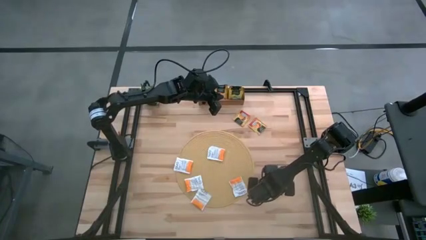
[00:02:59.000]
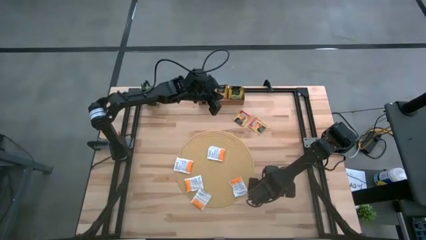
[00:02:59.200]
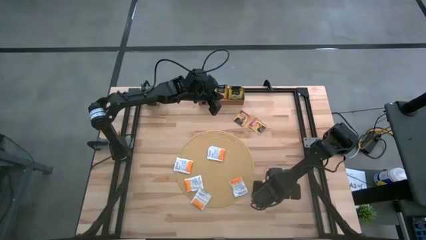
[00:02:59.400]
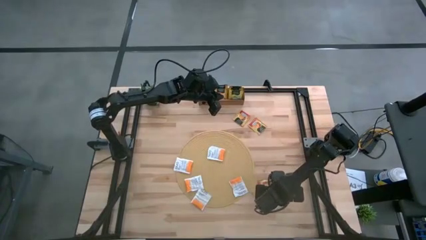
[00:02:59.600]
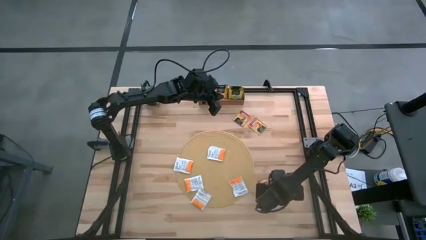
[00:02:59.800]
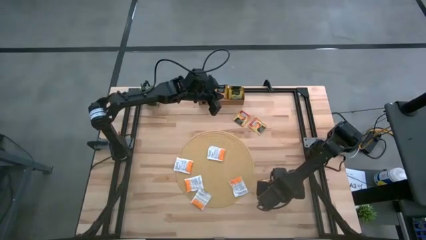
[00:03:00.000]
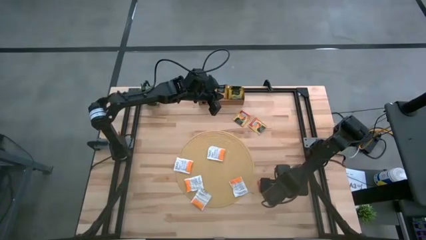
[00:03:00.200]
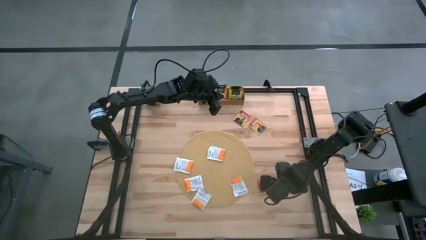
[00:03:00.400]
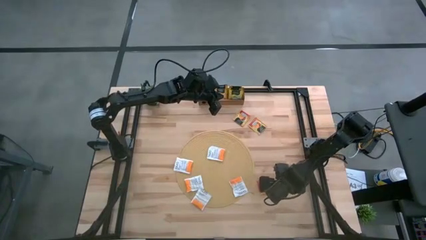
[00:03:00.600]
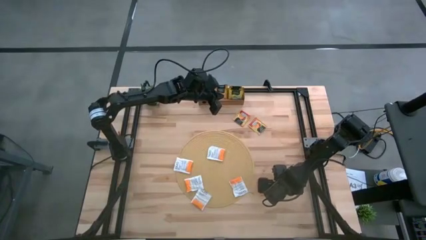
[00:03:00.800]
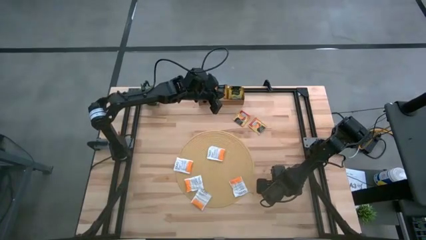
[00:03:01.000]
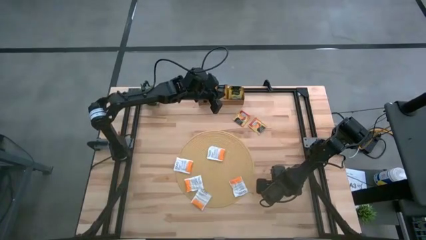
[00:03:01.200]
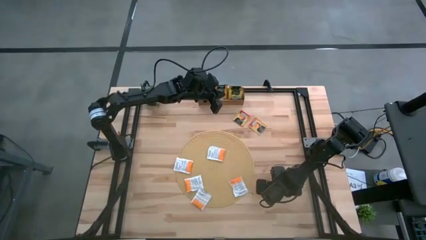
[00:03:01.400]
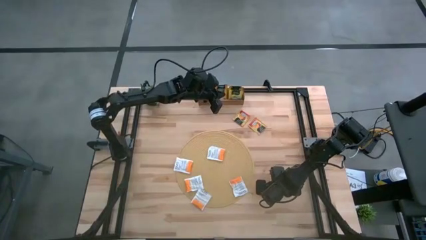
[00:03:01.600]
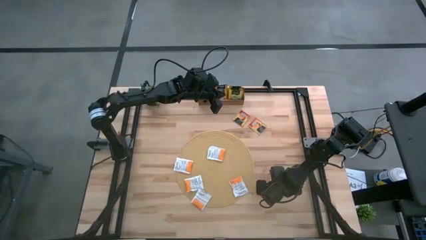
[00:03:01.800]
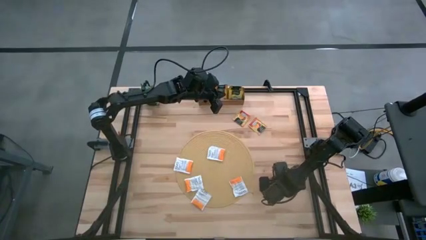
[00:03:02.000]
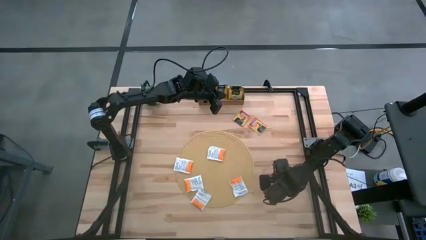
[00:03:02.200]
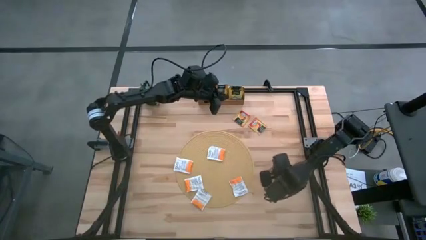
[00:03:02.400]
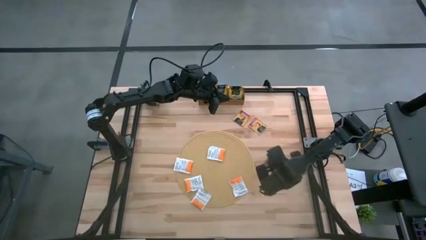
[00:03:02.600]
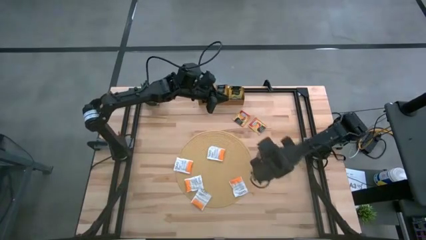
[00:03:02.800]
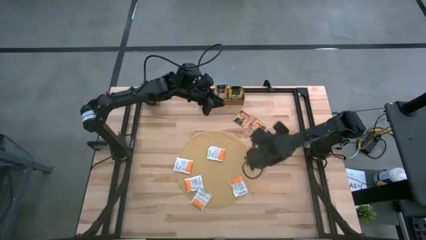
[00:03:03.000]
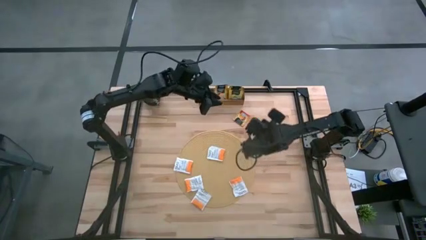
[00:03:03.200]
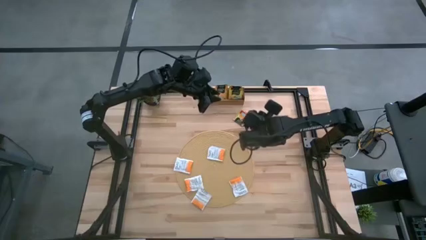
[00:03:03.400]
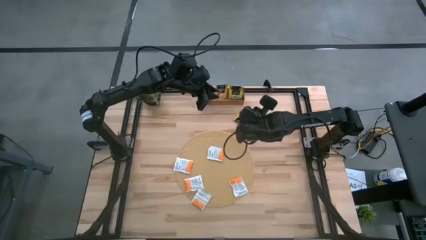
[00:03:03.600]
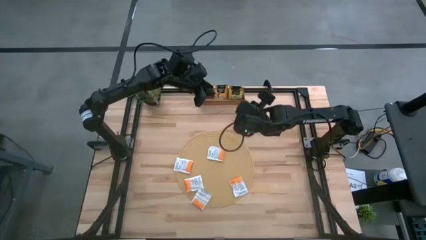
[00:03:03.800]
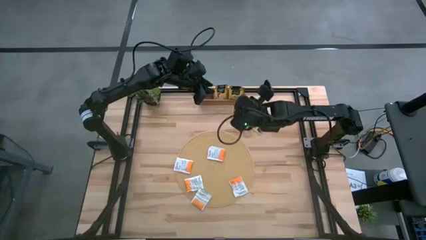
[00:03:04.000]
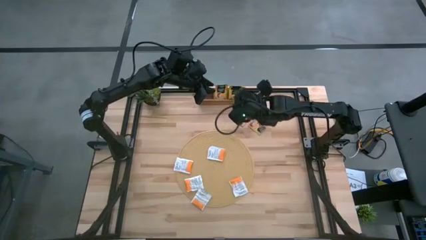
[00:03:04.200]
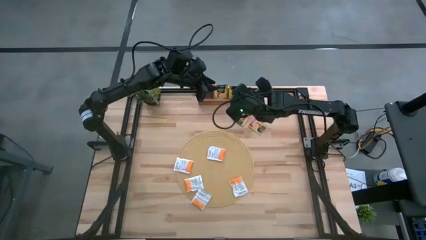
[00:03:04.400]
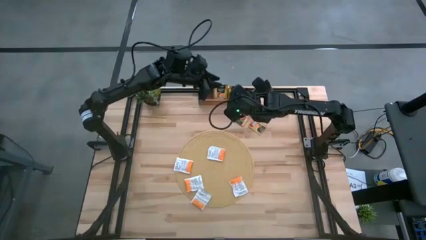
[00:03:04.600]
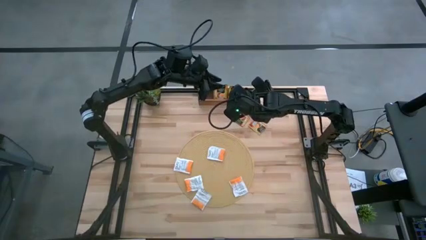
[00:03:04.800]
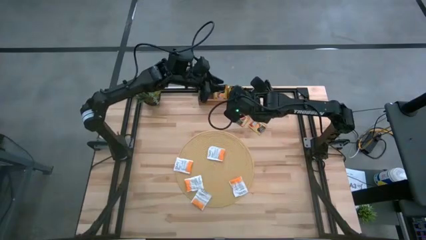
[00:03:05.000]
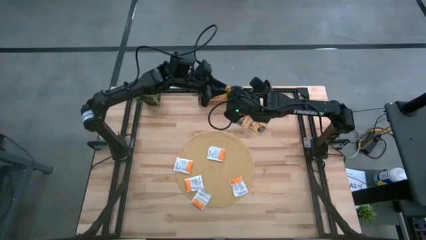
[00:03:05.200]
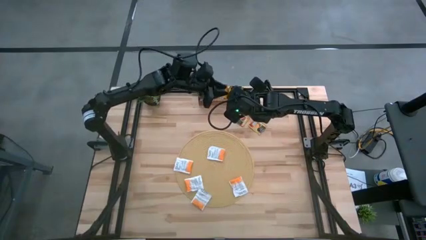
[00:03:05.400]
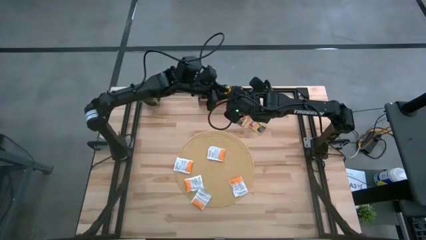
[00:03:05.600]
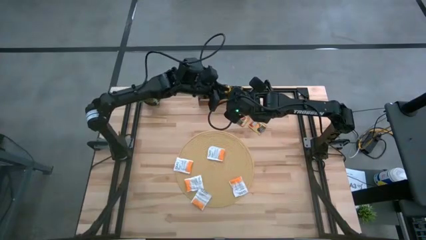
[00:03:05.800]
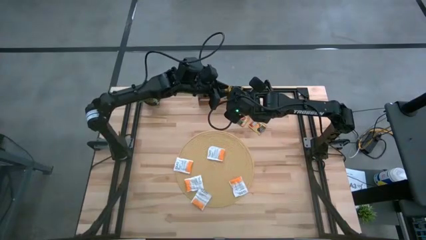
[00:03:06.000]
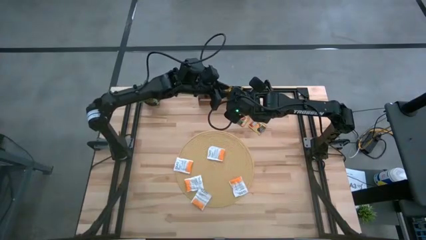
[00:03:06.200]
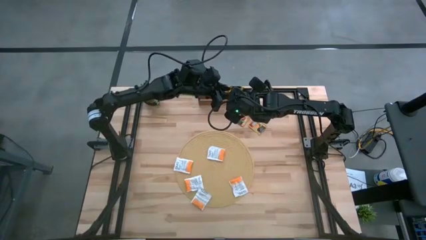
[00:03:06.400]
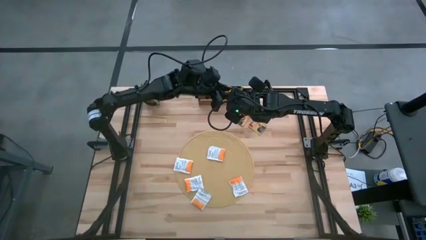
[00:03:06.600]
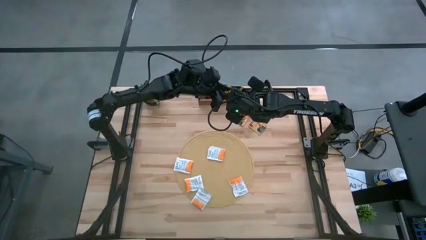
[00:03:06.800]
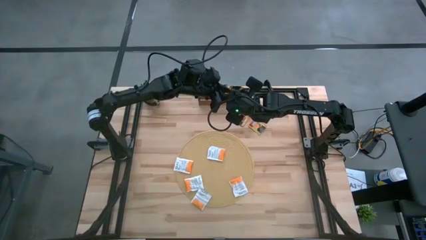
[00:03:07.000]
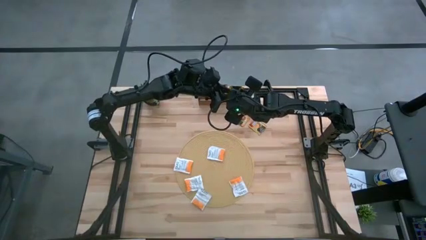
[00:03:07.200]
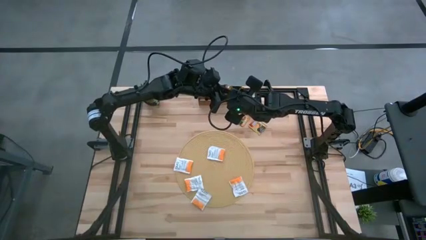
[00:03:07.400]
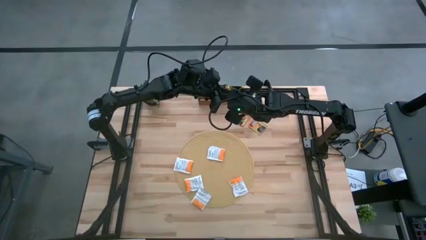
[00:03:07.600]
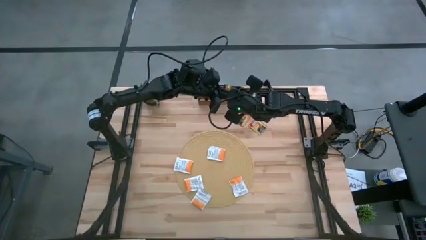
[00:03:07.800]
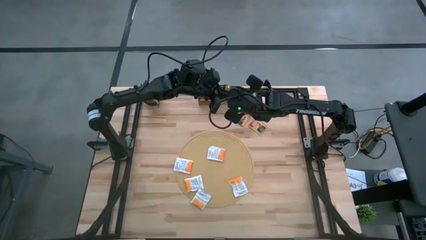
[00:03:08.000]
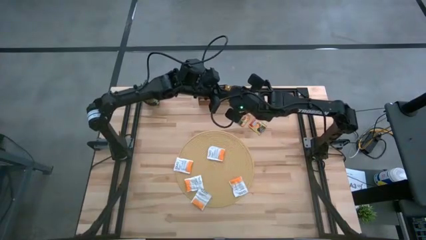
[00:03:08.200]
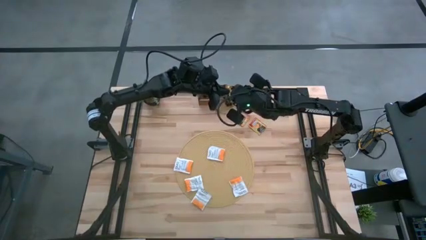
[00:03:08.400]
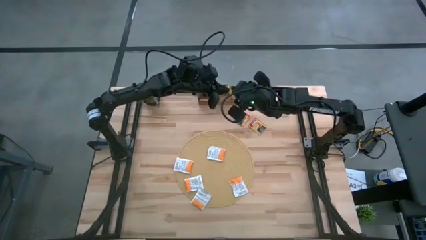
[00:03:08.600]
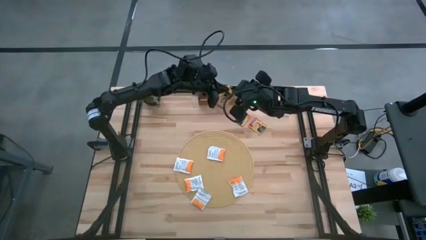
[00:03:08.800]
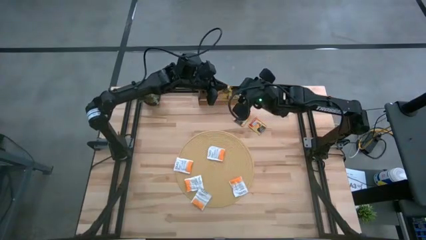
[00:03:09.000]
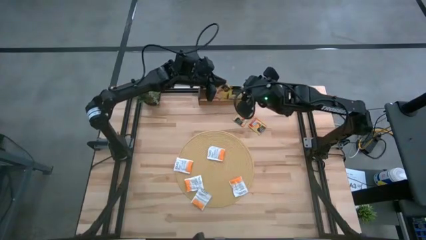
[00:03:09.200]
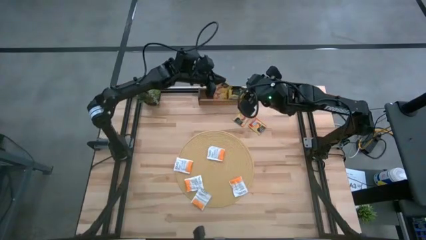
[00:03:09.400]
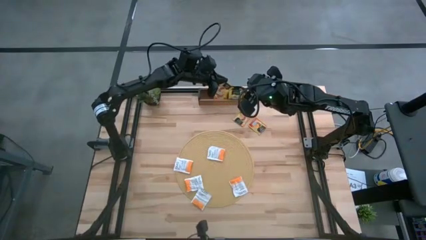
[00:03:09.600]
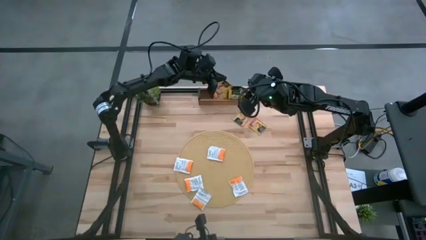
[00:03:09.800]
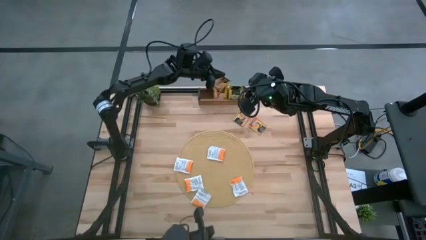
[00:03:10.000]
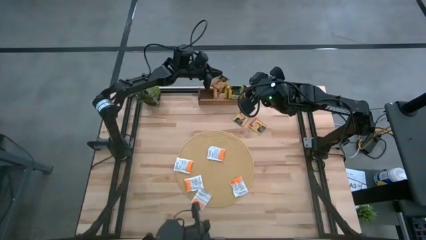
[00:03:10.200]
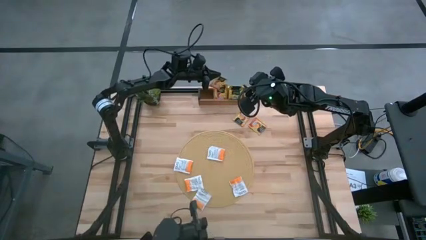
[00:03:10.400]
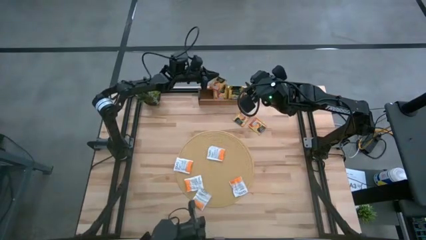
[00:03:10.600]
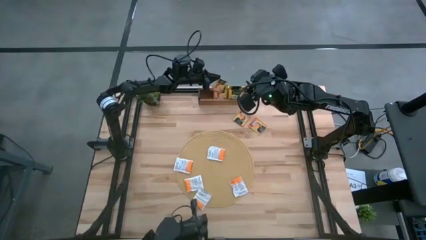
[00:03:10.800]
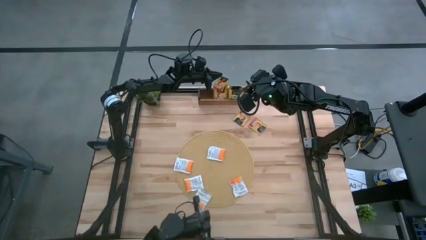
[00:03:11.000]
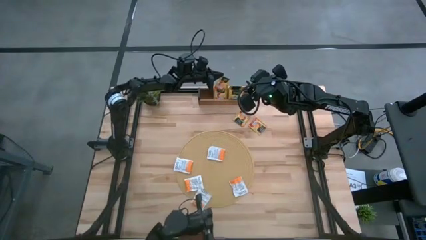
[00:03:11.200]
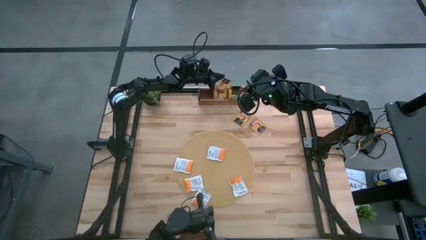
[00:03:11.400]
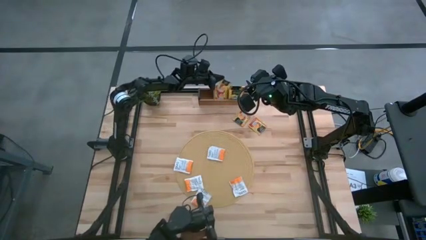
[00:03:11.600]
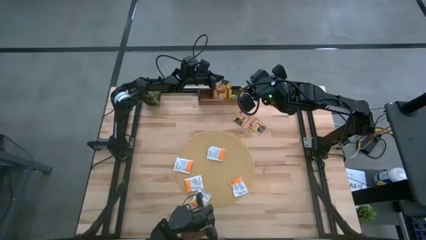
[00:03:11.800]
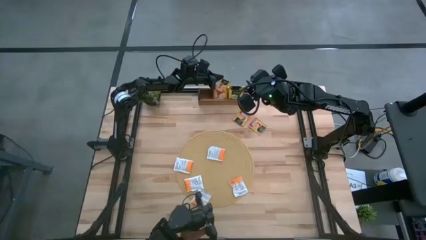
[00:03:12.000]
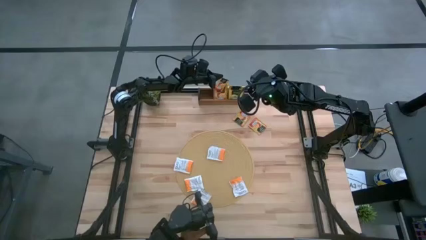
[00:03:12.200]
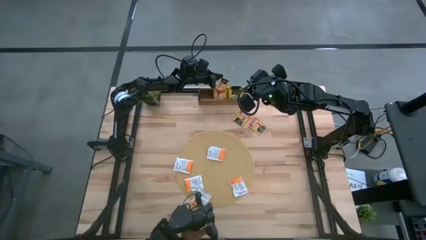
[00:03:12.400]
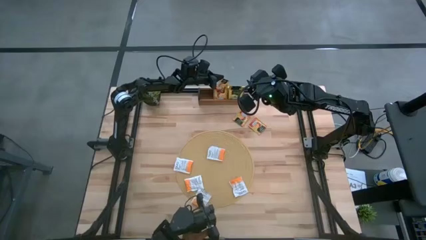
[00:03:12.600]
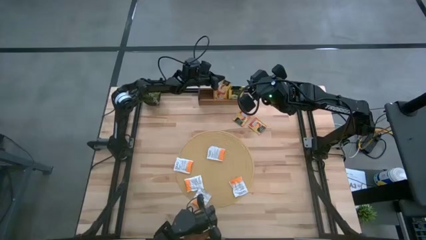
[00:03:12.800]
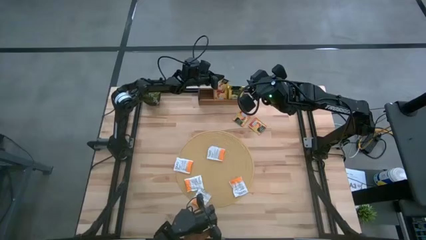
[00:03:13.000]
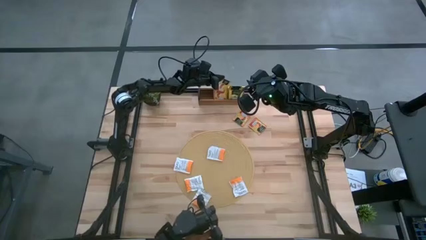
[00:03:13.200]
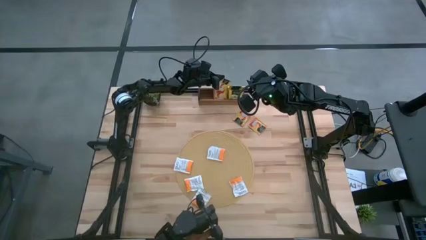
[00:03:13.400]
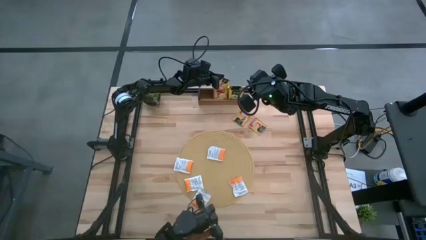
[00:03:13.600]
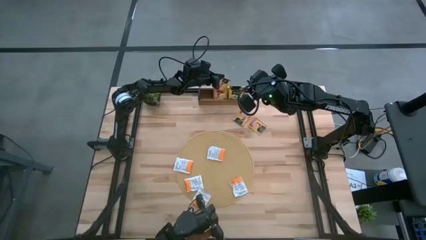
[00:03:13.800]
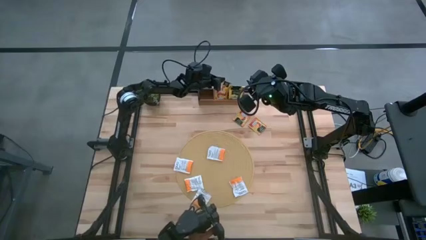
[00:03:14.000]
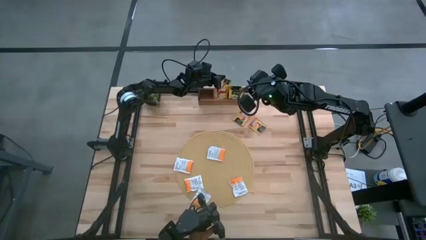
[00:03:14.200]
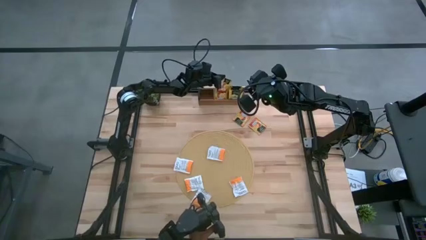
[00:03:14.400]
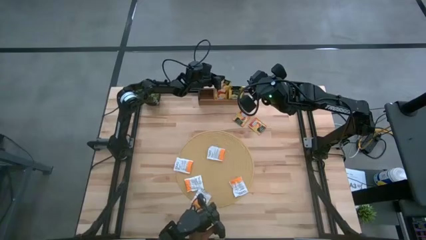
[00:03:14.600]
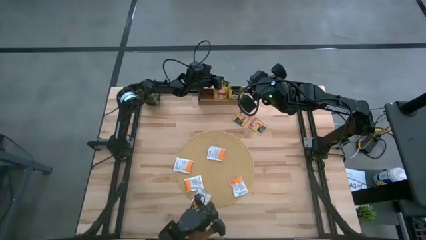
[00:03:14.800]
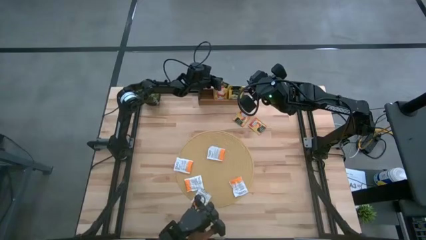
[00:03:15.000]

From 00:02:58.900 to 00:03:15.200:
Task: Pick & Place Tea
Put the bottom red tea bag into the middle section of the wooden organizer
